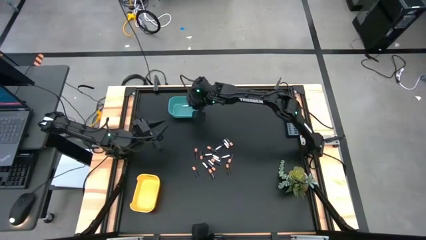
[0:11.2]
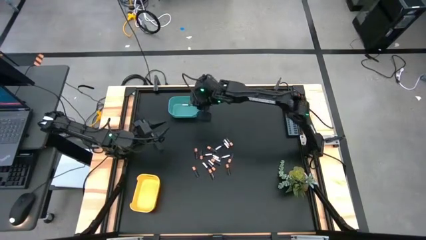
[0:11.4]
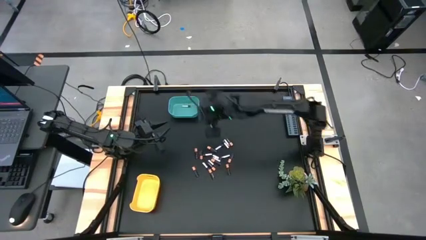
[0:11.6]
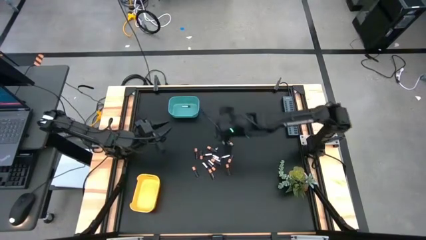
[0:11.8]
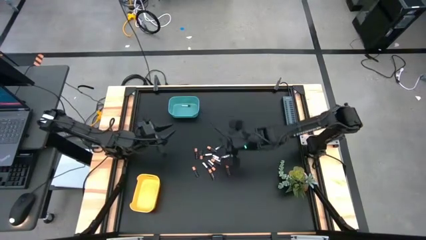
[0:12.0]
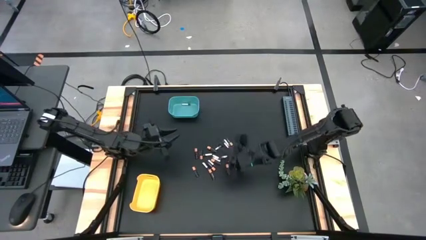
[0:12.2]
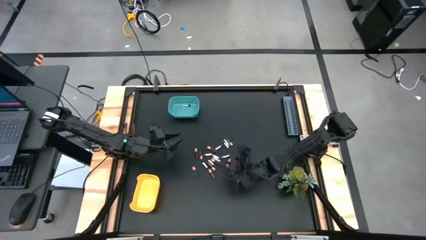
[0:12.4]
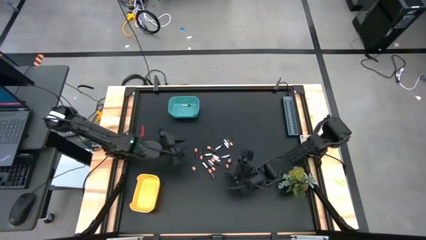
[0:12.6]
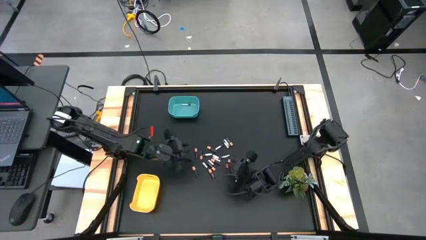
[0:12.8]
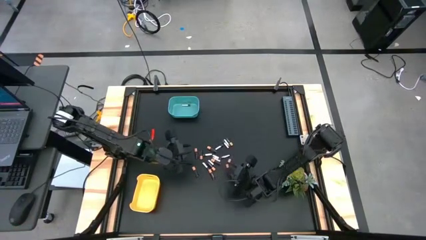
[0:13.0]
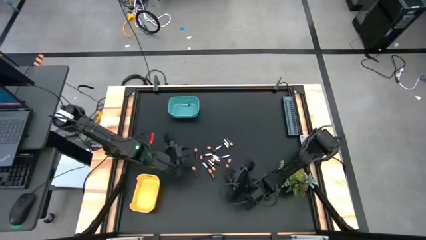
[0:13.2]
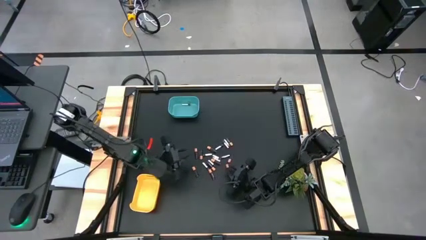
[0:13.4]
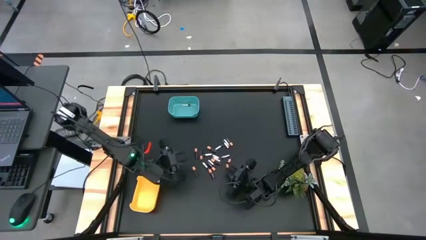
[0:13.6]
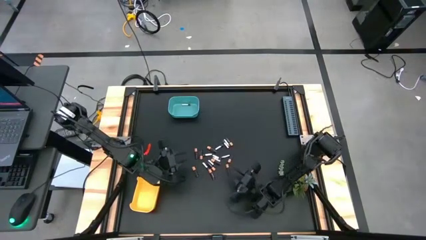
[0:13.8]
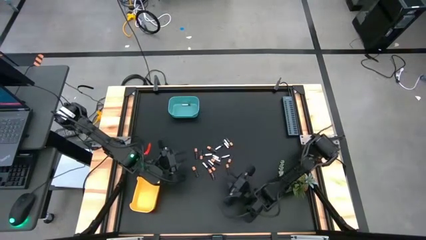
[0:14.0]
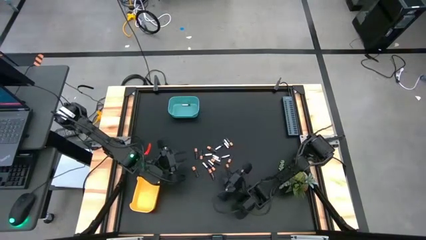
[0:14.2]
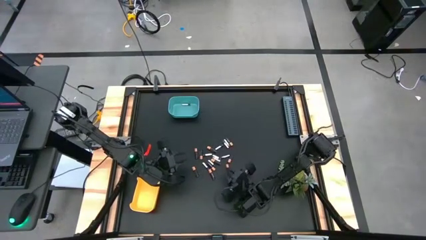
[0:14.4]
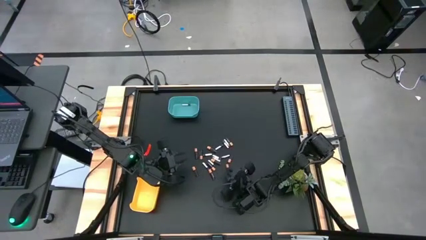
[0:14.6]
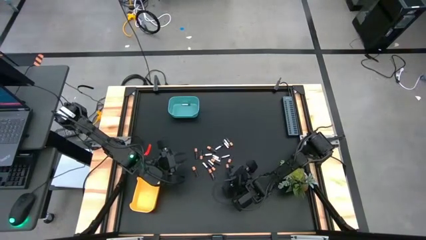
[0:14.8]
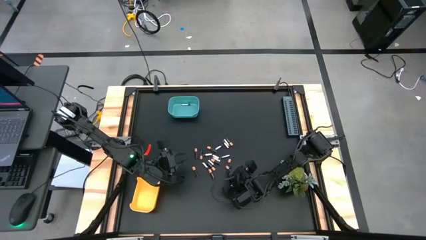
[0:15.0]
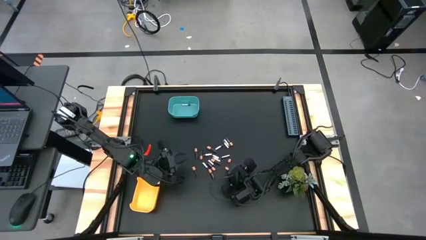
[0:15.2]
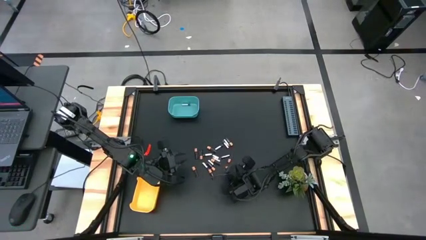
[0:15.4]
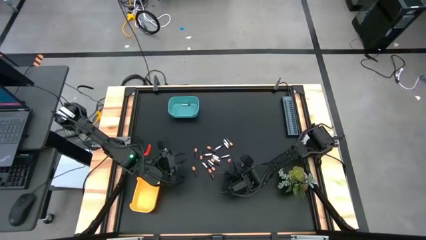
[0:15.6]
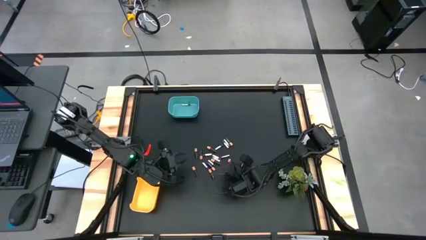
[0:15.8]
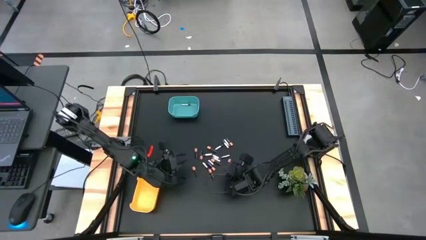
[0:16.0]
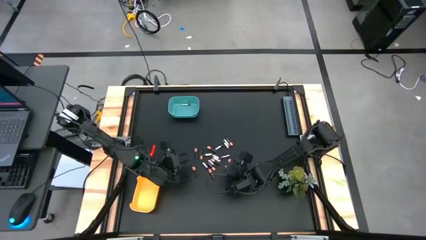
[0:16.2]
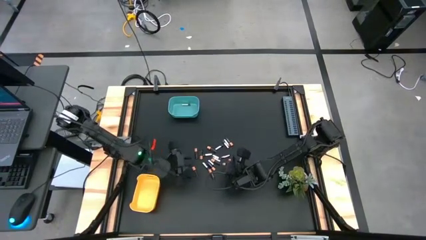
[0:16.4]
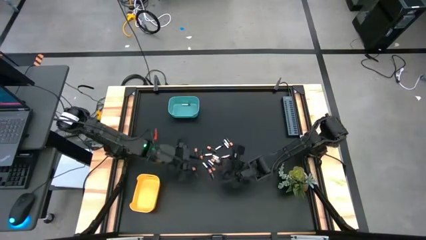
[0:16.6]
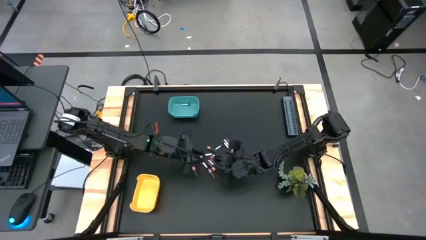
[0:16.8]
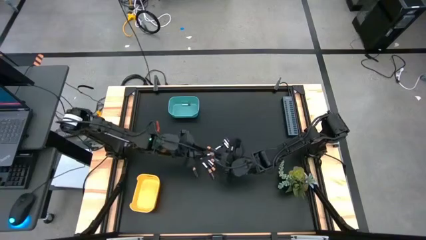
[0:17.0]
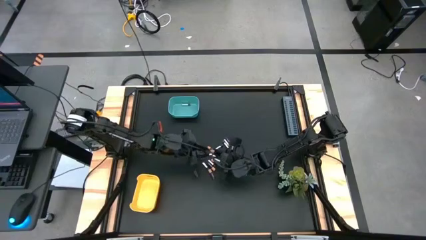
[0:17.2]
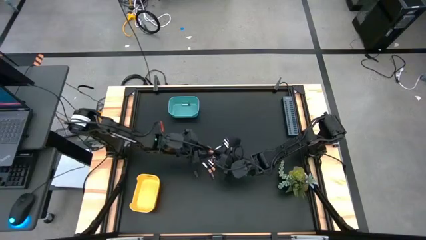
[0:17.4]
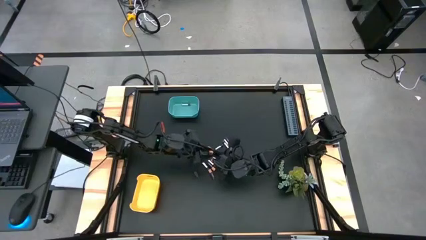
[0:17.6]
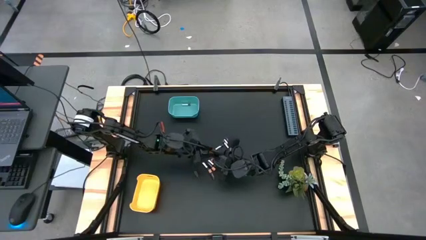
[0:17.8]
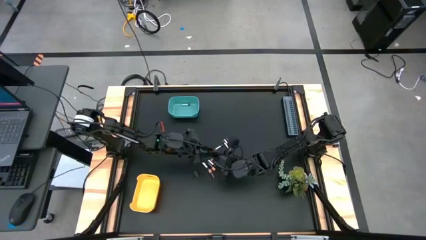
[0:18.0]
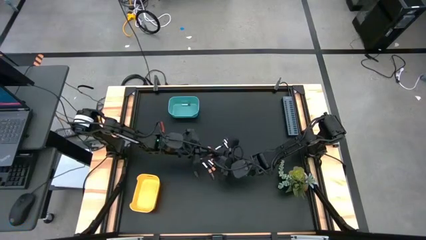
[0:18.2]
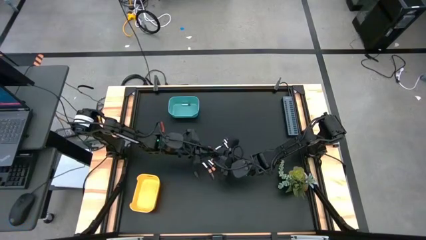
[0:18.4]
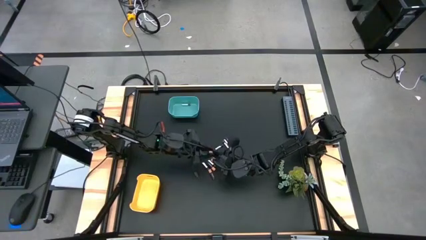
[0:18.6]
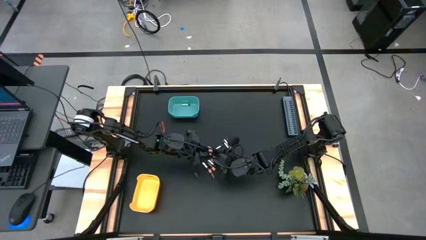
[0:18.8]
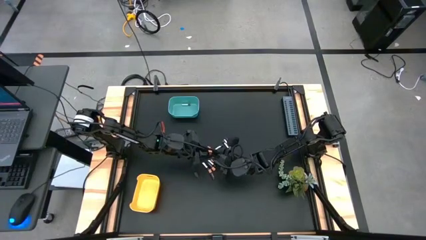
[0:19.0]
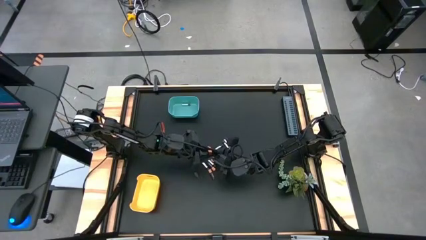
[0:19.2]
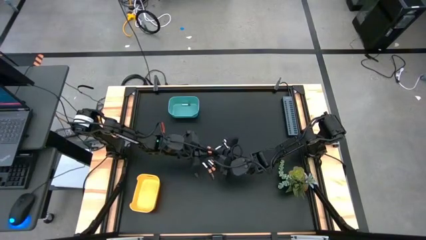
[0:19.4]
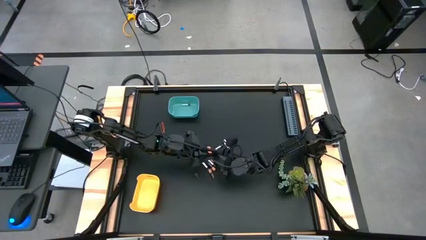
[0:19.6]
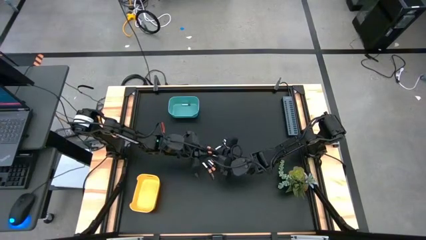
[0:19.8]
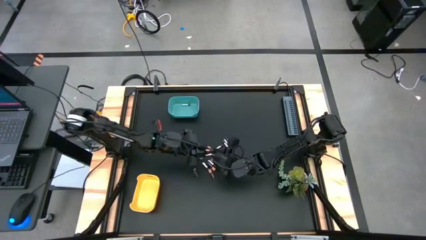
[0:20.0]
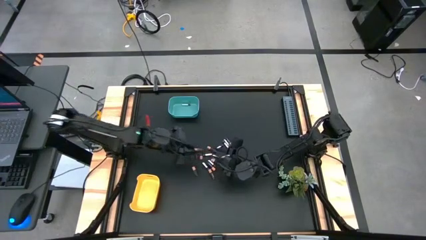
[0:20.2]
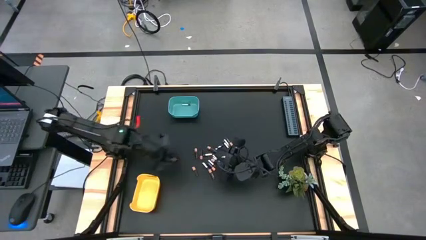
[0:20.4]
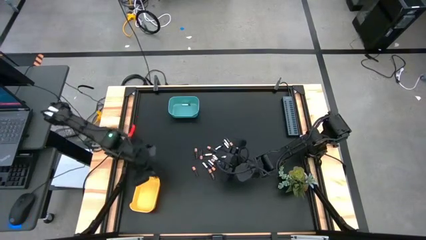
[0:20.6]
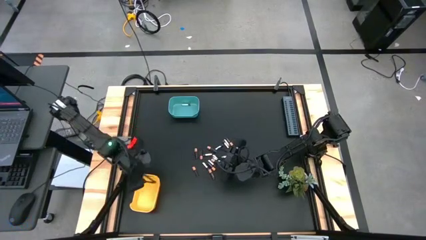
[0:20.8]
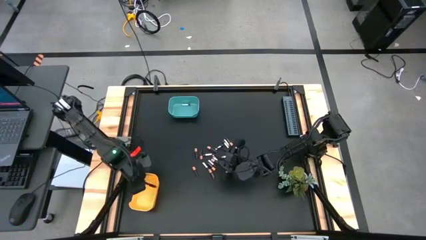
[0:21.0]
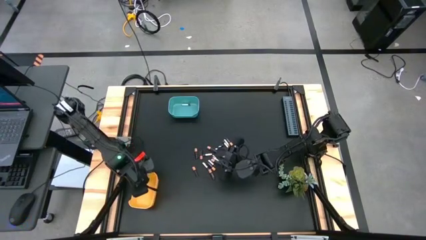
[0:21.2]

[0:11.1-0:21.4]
Task: Sort batteries
Put the black battery into the yellow bin

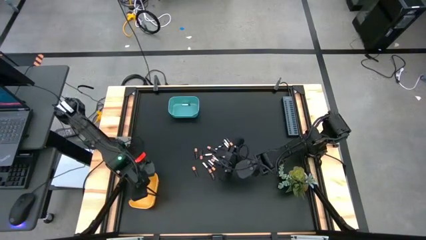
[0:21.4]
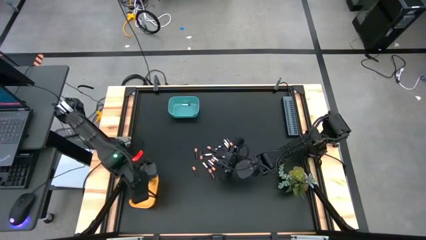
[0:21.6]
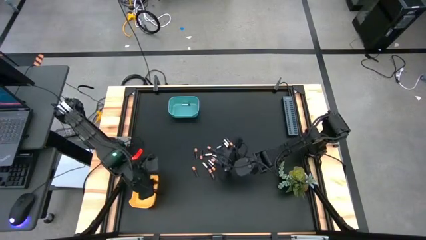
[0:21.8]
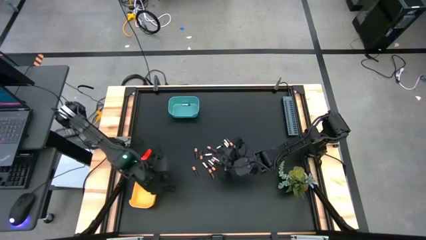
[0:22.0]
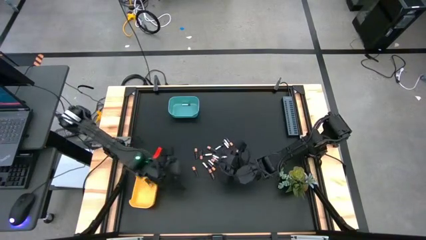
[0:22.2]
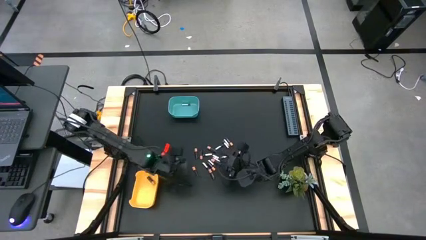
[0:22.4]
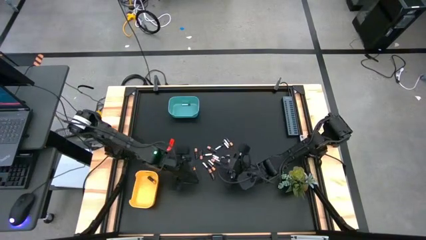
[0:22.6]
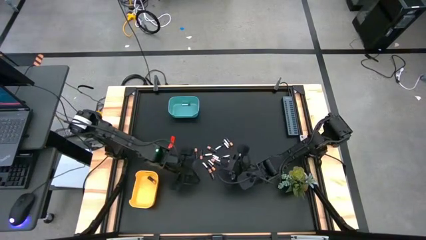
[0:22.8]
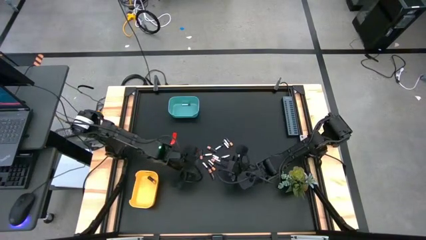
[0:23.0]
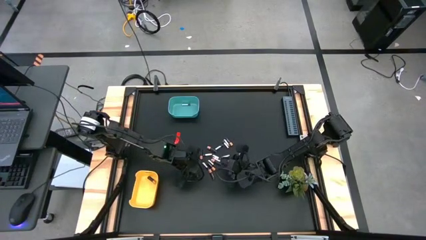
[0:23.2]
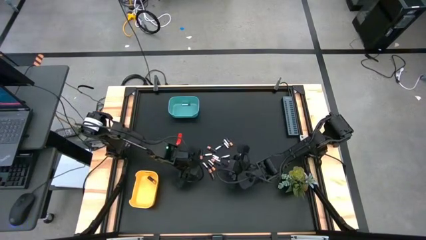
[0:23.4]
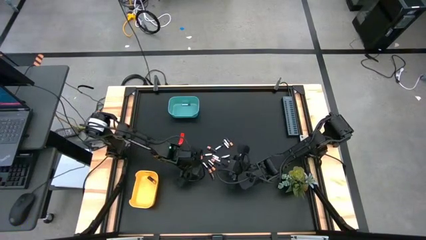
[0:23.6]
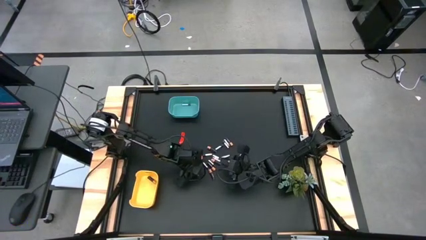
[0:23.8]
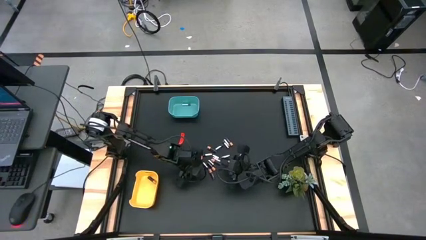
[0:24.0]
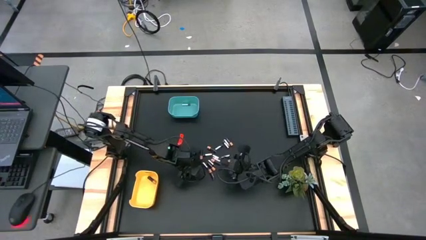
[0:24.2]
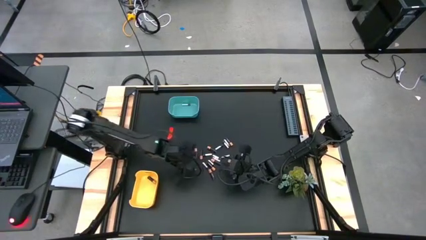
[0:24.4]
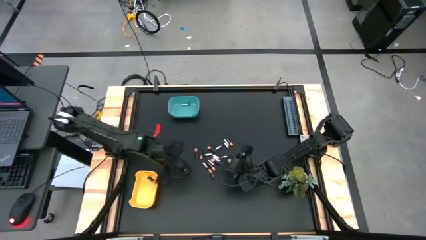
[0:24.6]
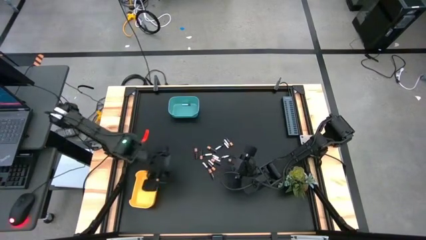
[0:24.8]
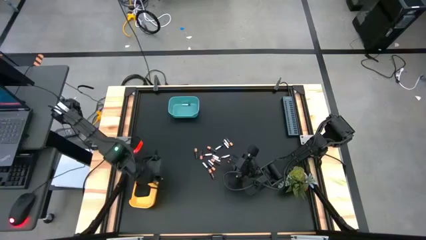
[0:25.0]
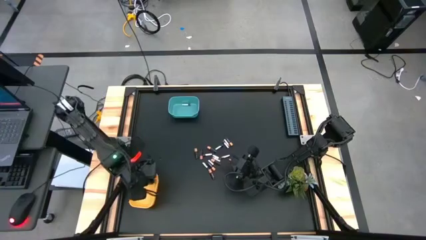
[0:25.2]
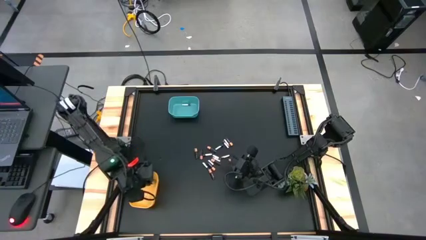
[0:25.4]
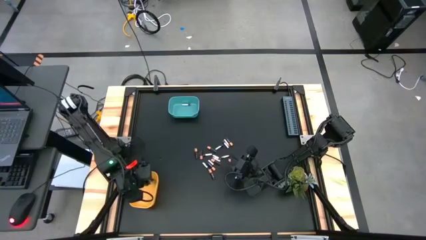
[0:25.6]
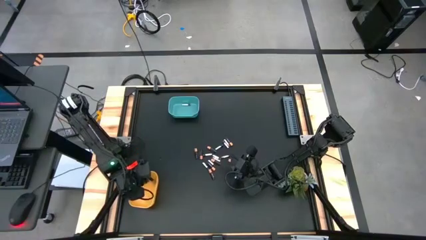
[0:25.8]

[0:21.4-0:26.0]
Put the black battery into the yellow bin
